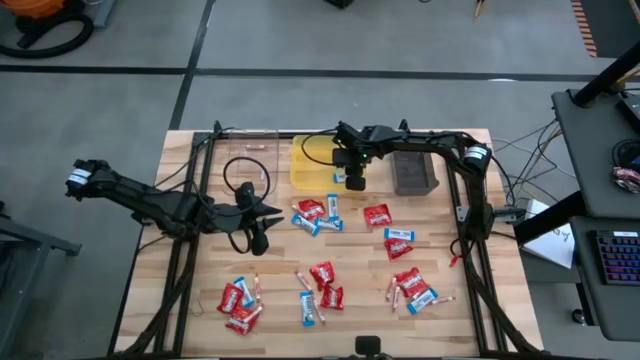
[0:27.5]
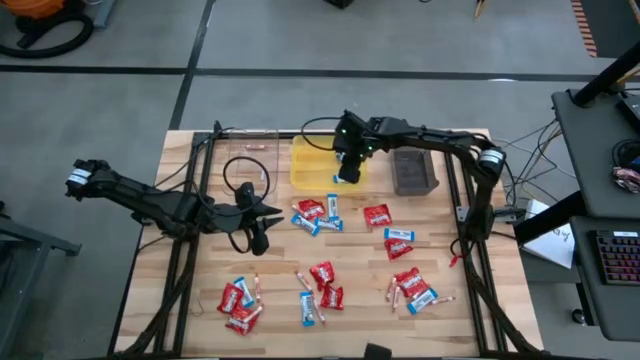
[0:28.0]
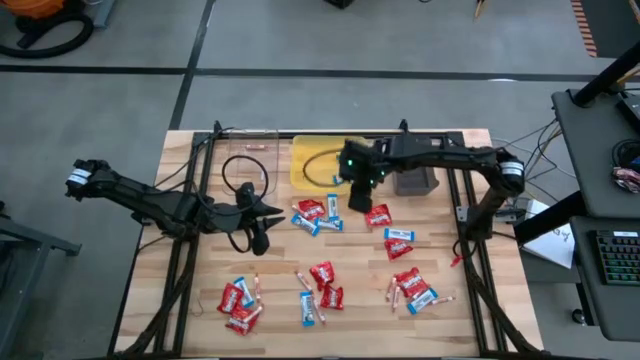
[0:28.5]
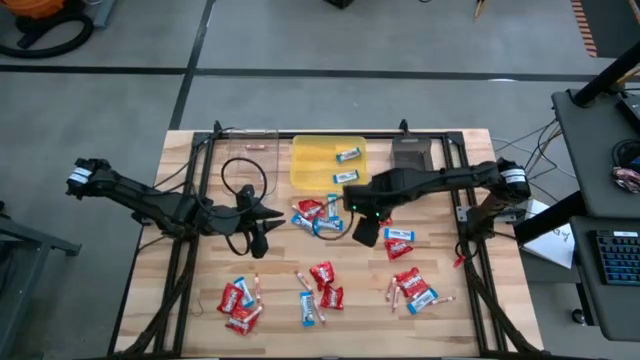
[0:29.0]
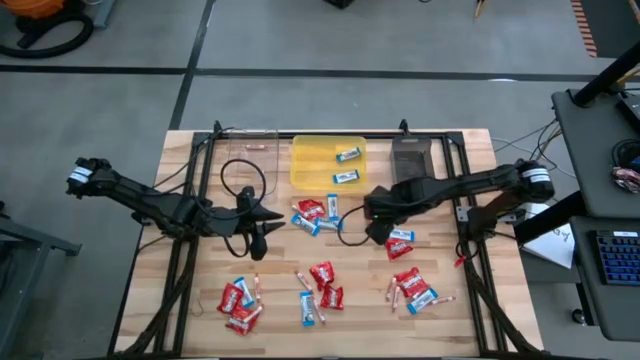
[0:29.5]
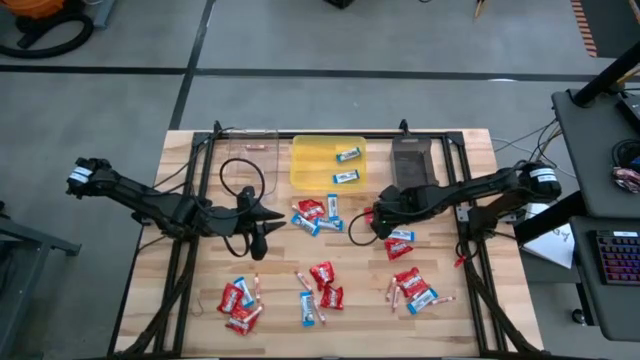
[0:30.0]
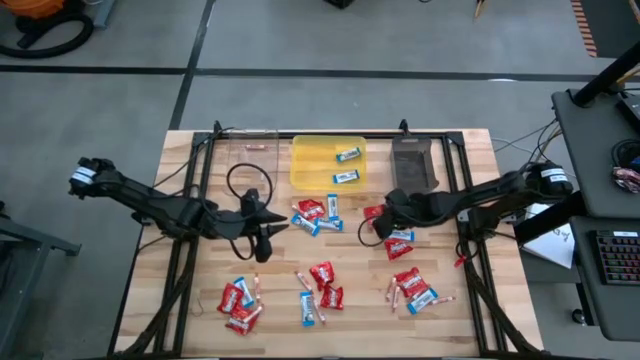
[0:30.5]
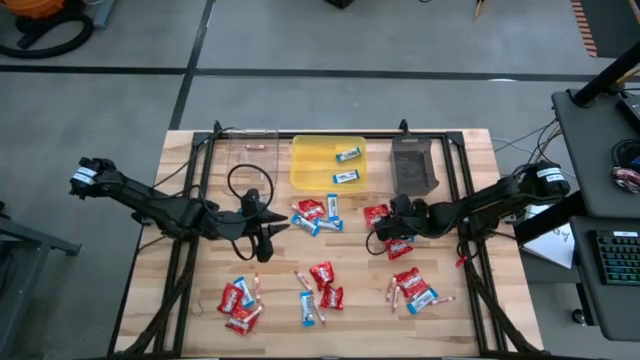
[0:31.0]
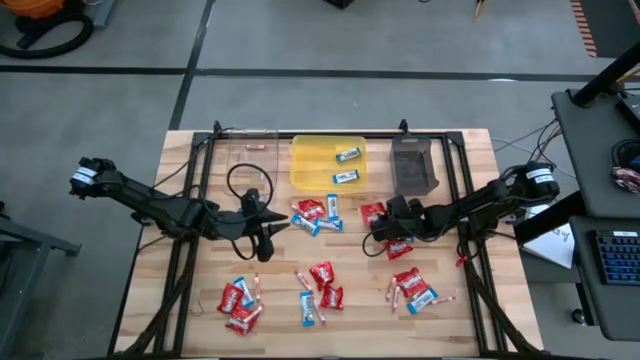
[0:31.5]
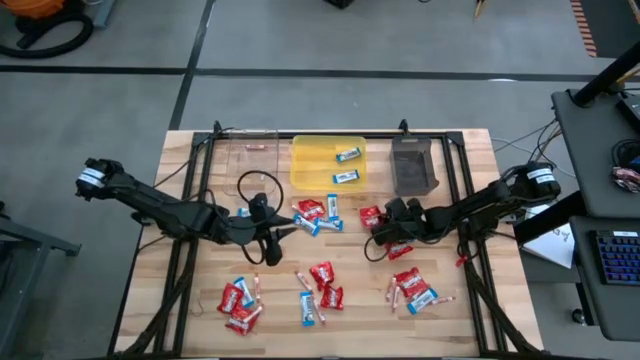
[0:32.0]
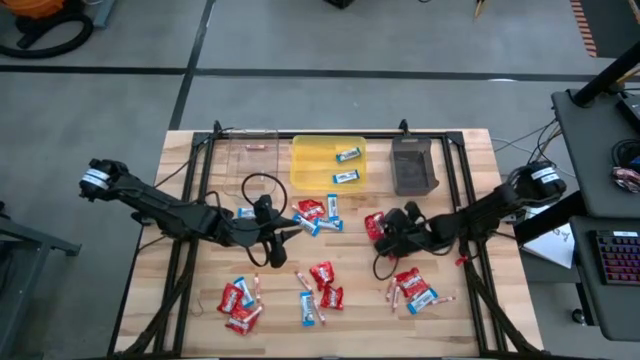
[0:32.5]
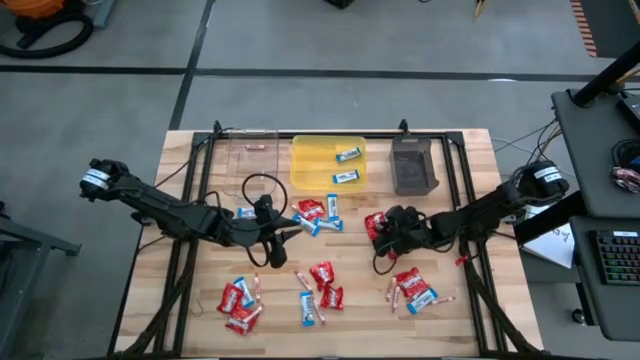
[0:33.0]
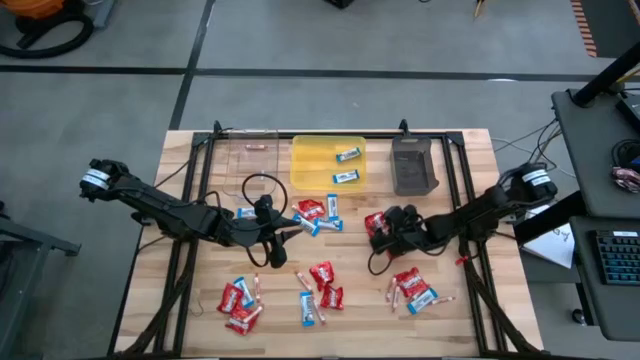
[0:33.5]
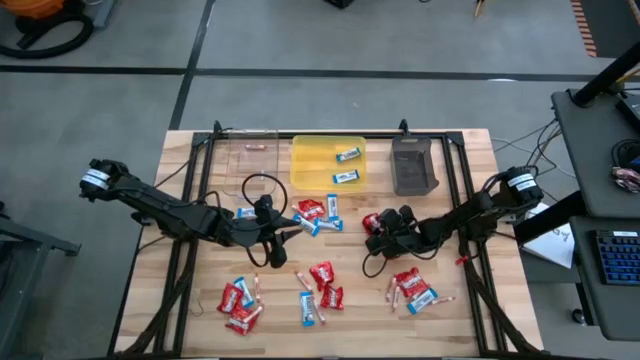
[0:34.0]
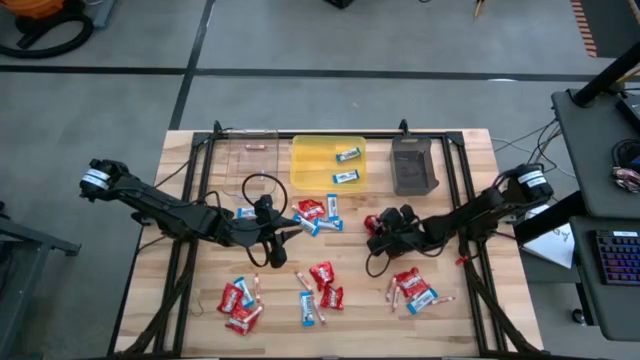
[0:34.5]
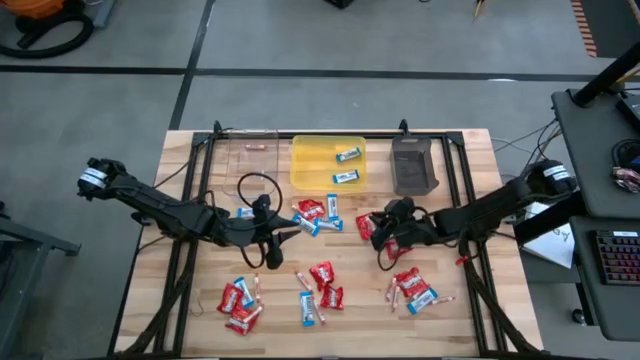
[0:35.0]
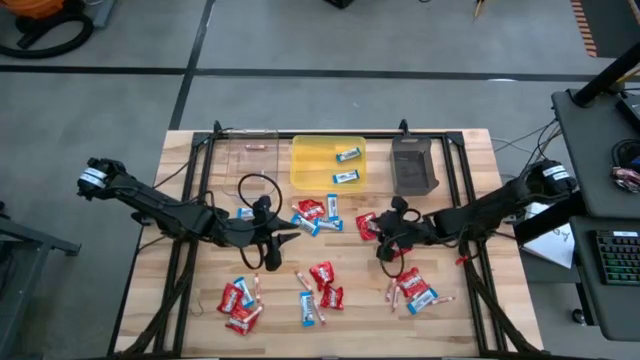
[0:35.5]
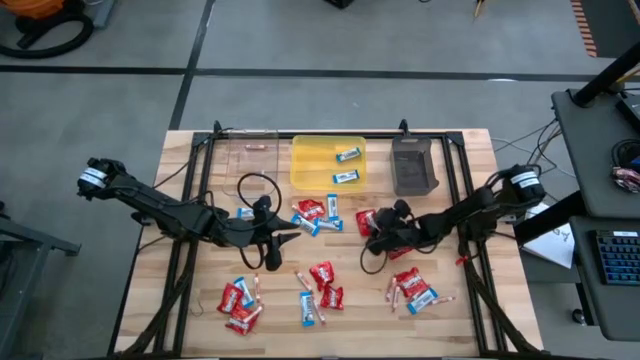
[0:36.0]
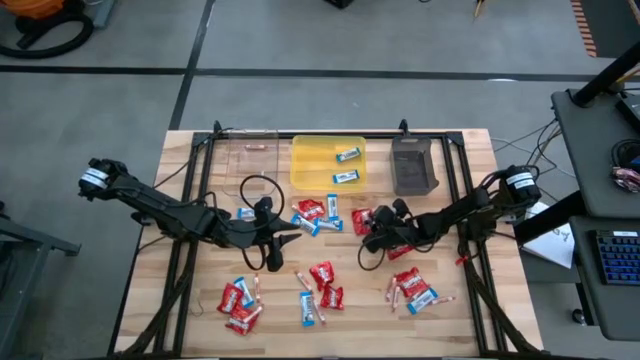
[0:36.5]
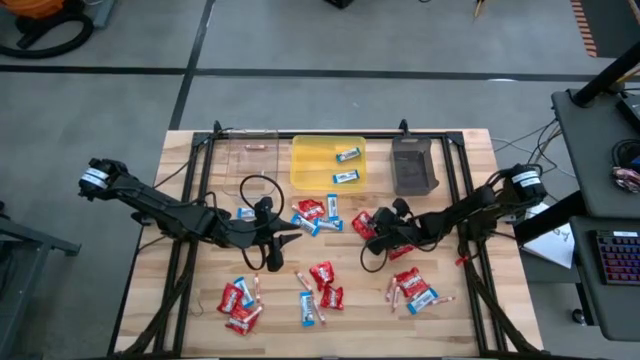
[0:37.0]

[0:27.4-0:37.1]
Task: Sort candy
Put the red candy into the black bin

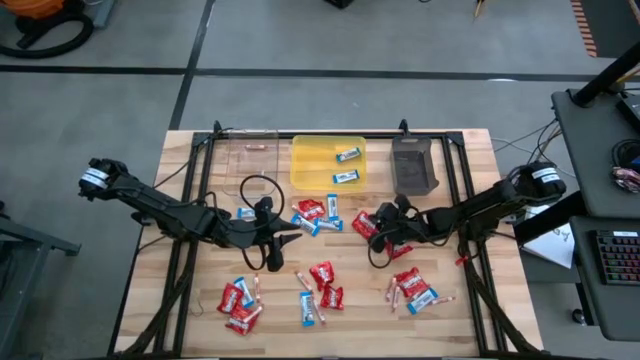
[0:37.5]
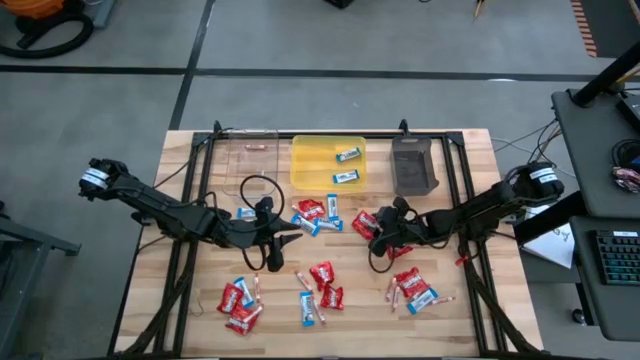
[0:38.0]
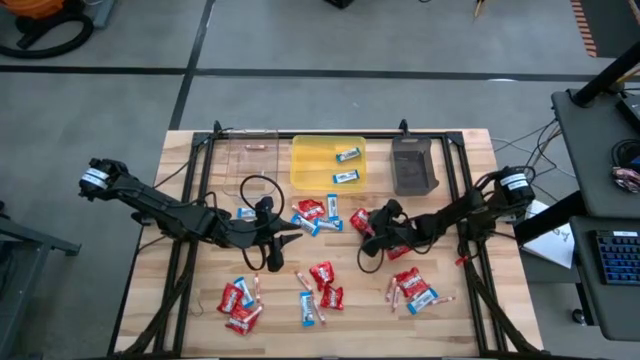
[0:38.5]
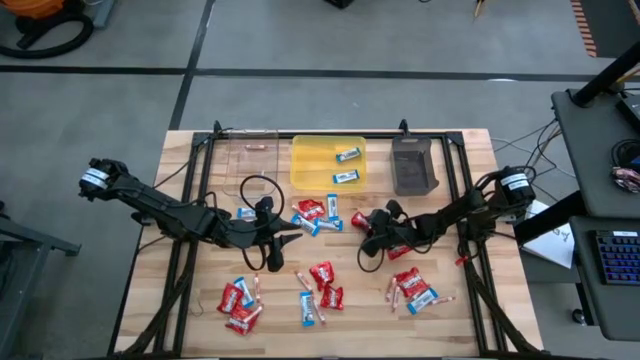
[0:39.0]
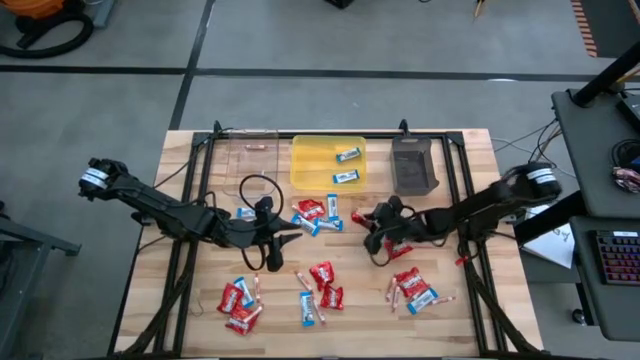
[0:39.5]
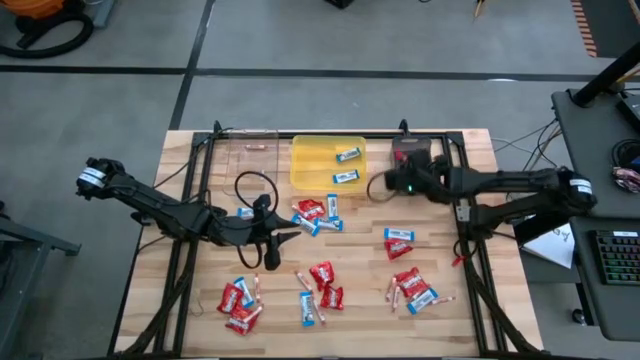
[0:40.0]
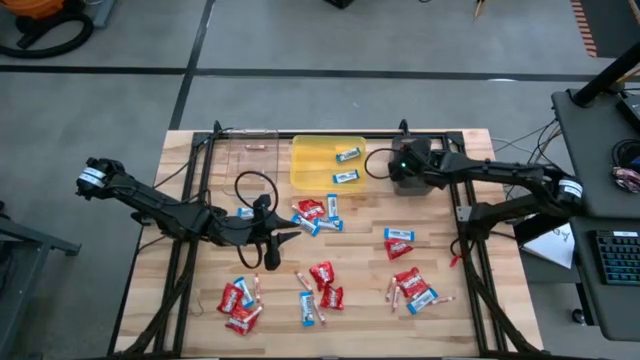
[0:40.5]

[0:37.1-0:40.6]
Put the red candy into the black bin

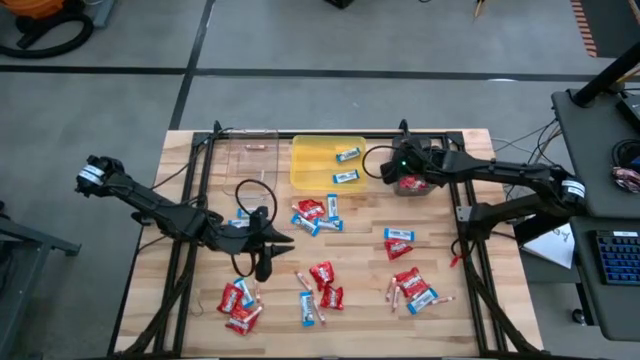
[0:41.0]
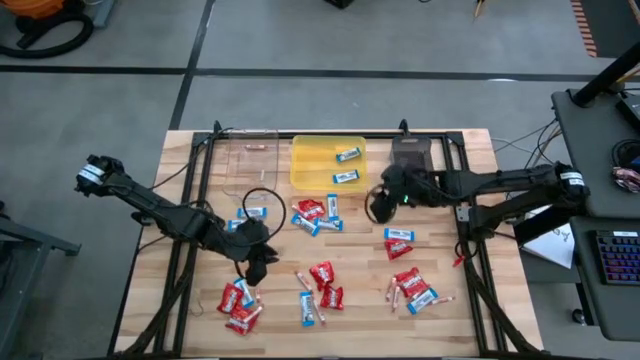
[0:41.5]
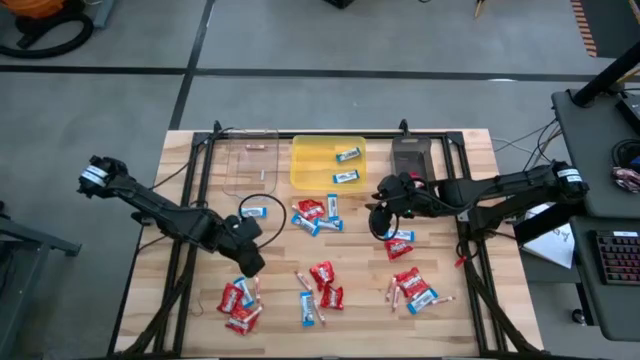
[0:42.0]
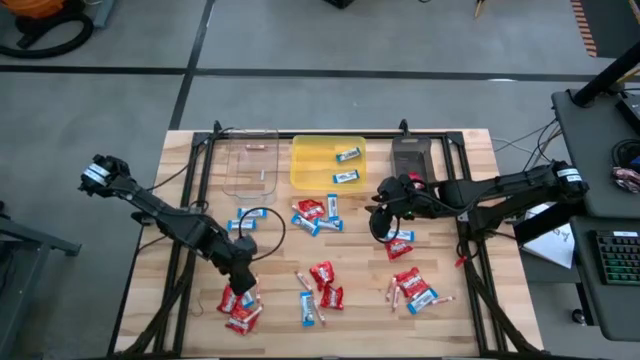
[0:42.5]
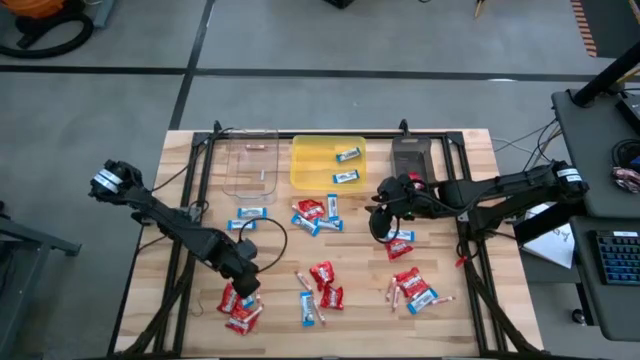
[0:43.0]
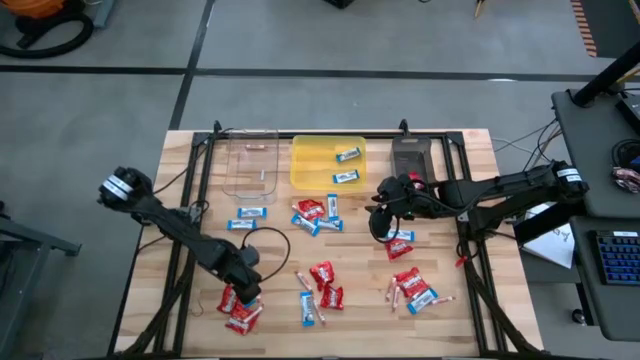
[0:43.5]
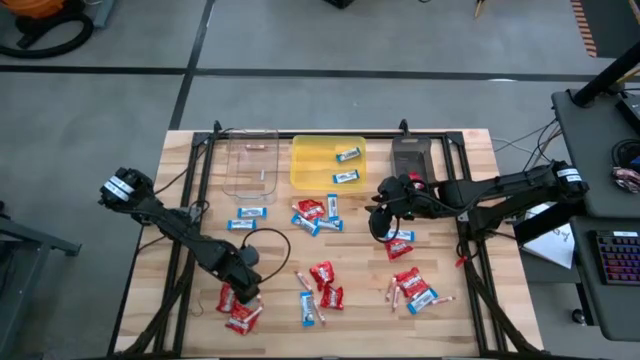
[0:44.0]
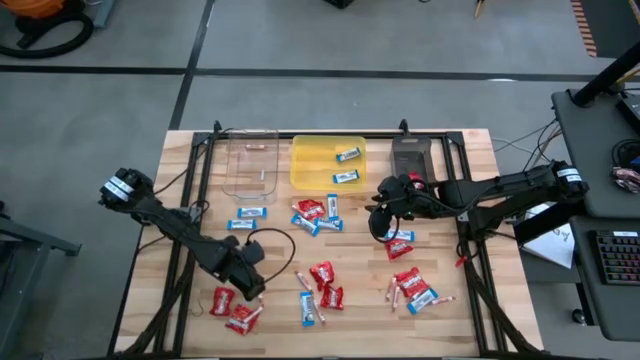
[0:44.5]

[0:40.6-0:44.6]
Put the white chocolate into the yellow bin

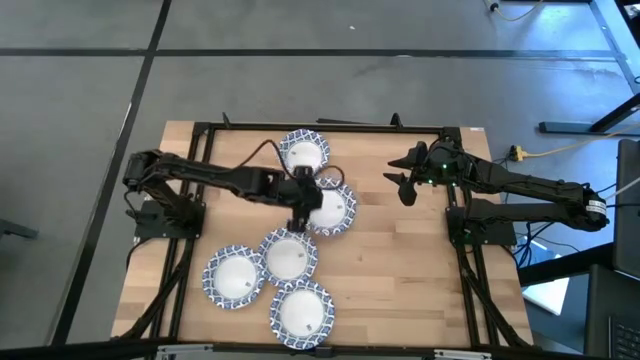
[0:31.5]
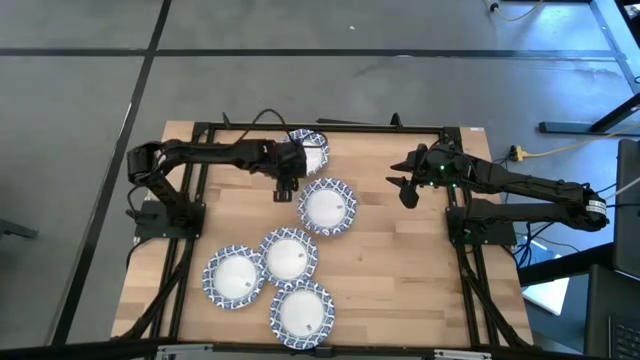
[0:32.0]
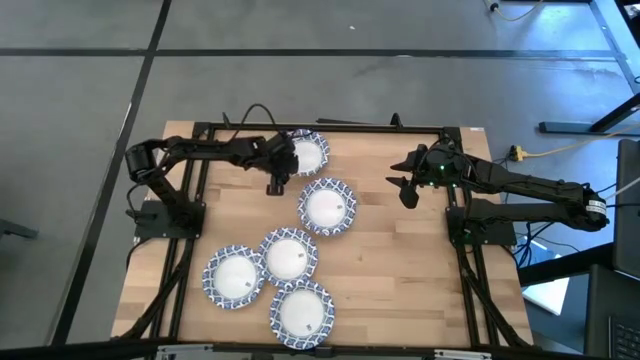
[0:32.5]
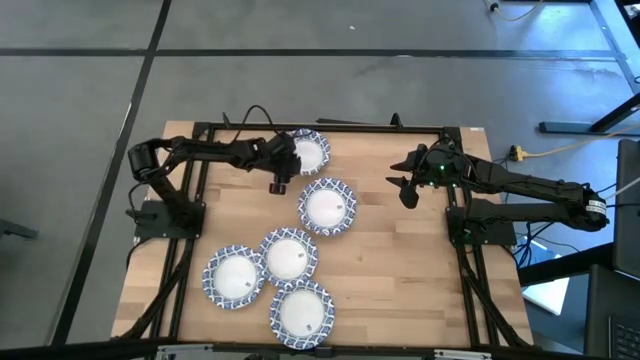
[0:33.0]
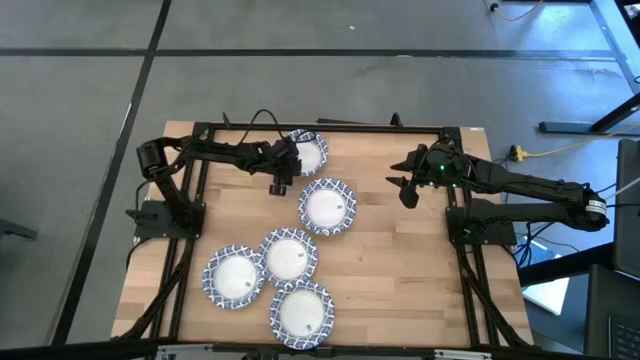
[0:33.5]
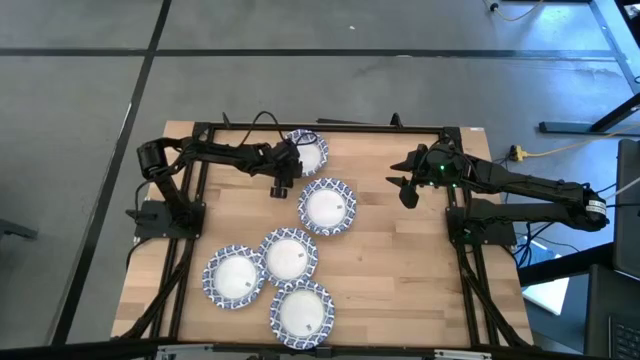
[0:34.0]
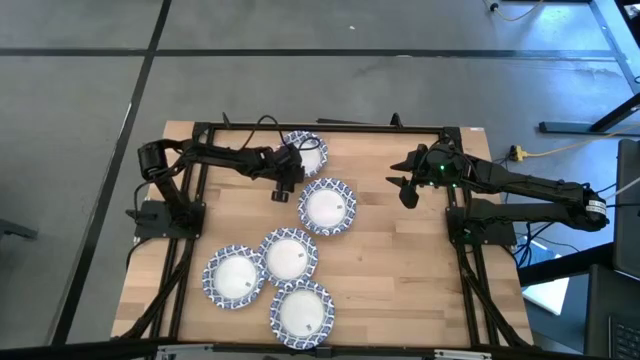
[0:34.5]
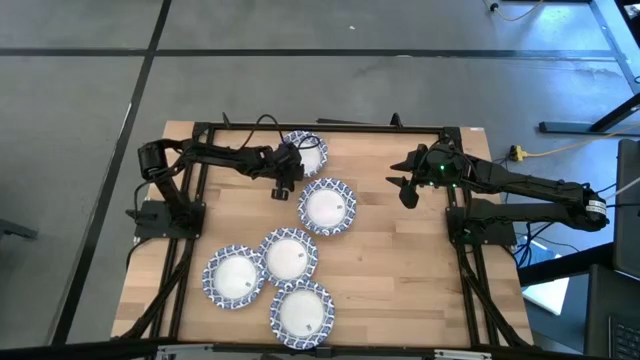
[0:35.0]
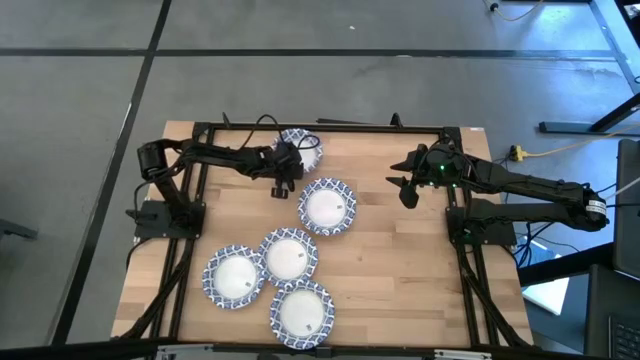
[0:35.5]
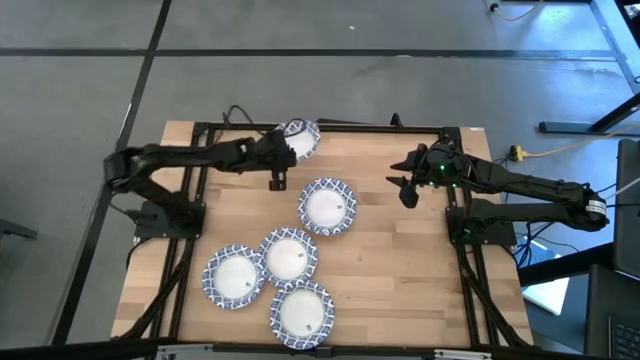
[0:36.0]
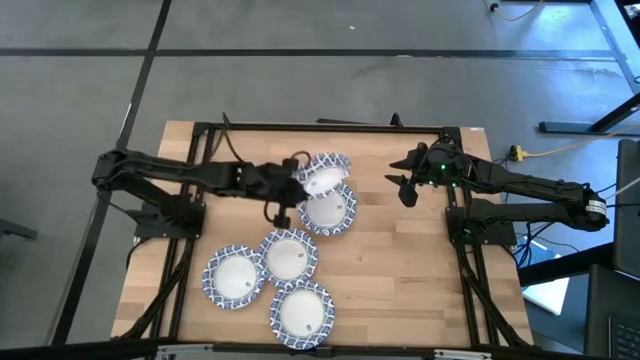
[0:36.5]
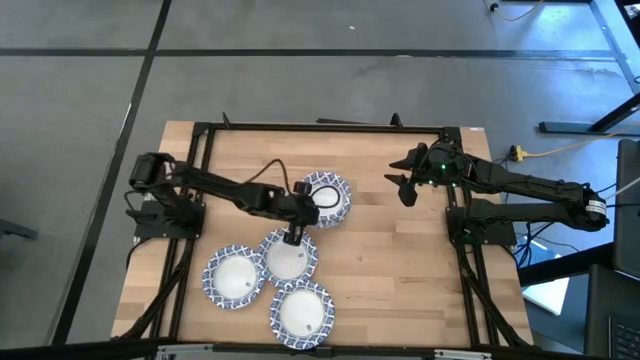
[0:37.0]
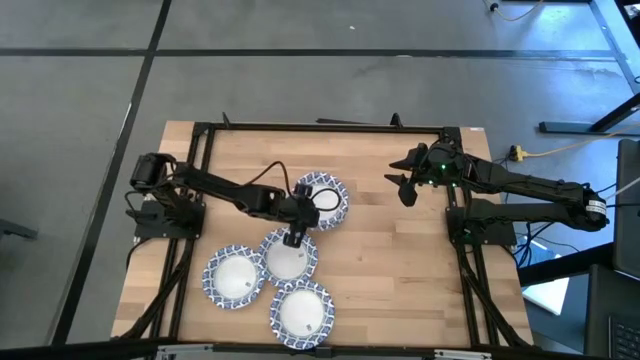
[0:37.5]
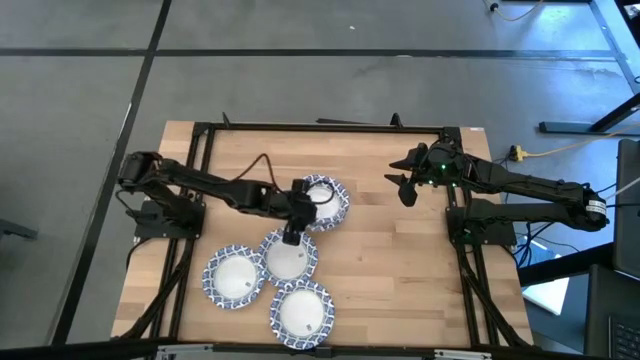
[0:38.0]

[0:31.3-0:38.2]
Task: Nest bowls inside each other
Stack the blue patterned bowl on the stacked blue patterned bowls
